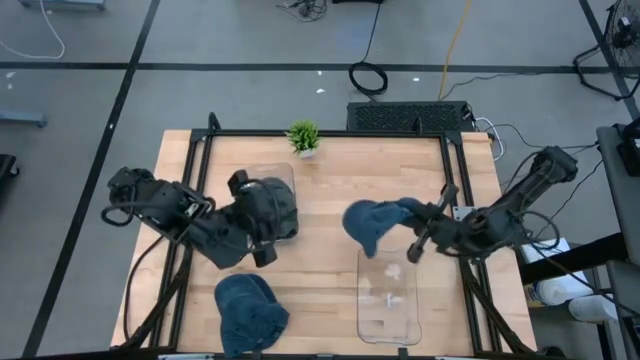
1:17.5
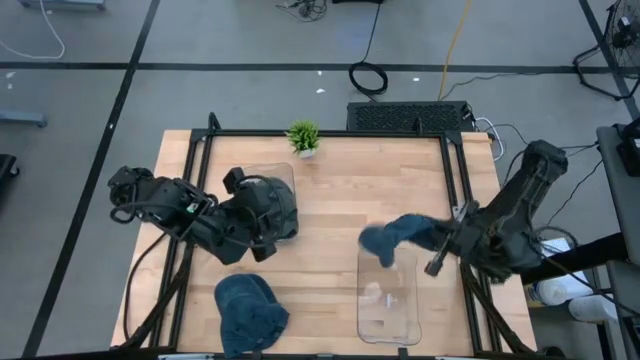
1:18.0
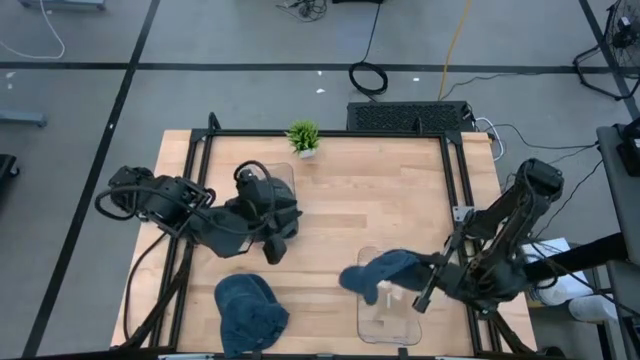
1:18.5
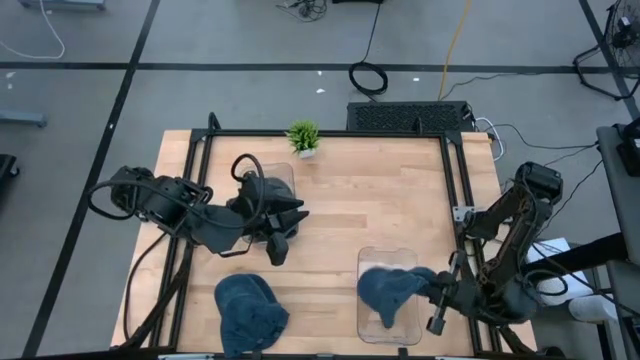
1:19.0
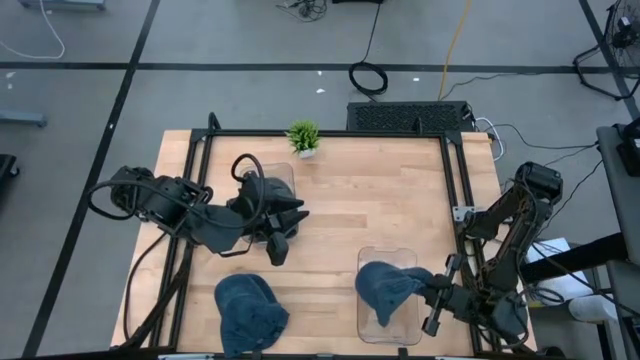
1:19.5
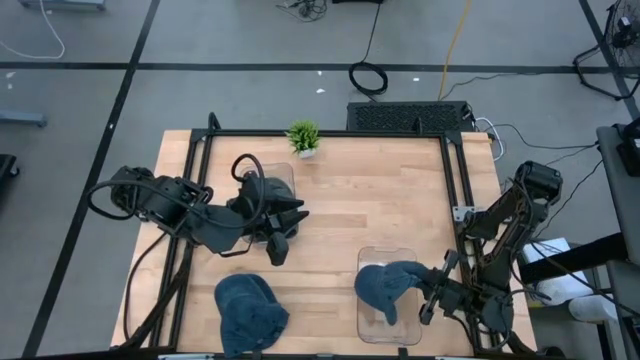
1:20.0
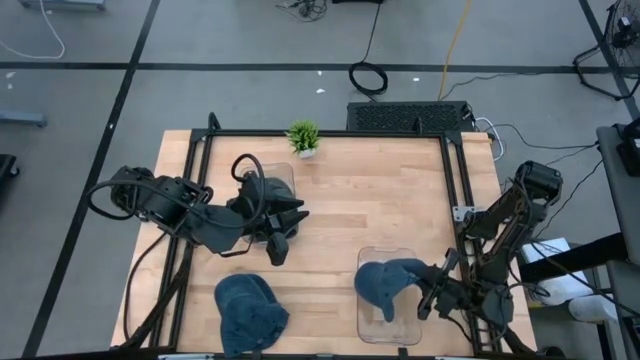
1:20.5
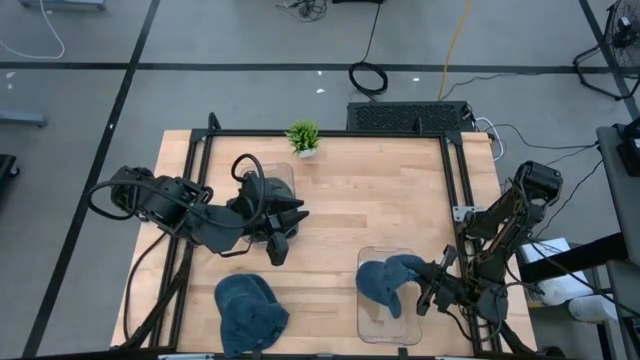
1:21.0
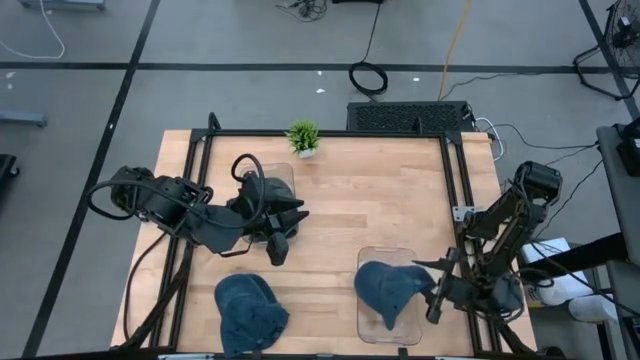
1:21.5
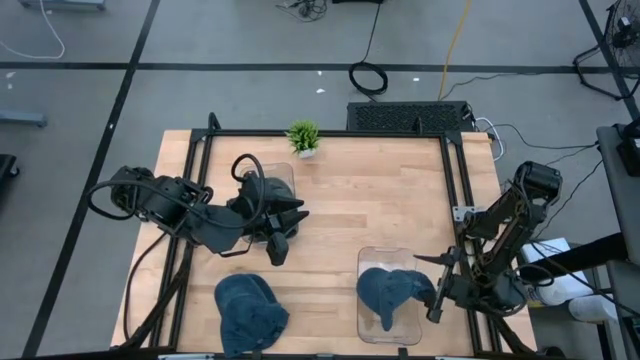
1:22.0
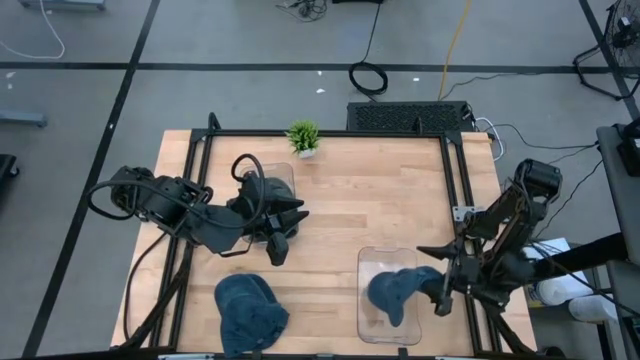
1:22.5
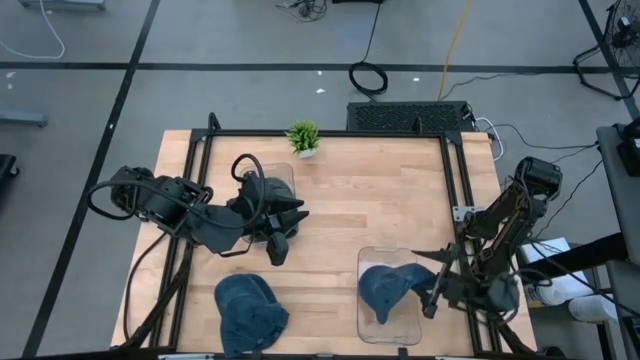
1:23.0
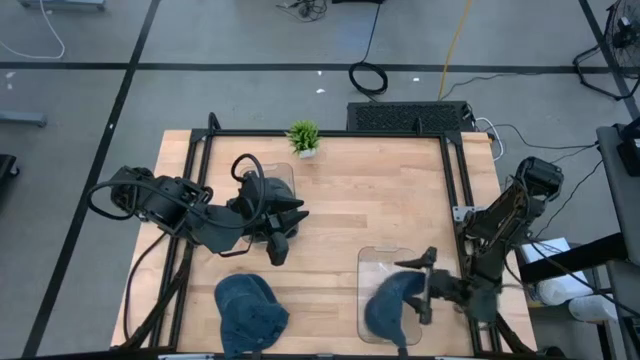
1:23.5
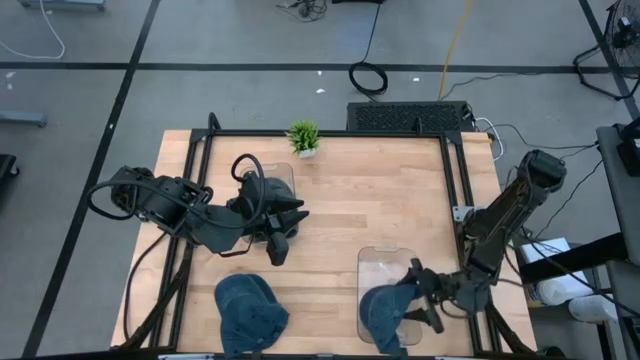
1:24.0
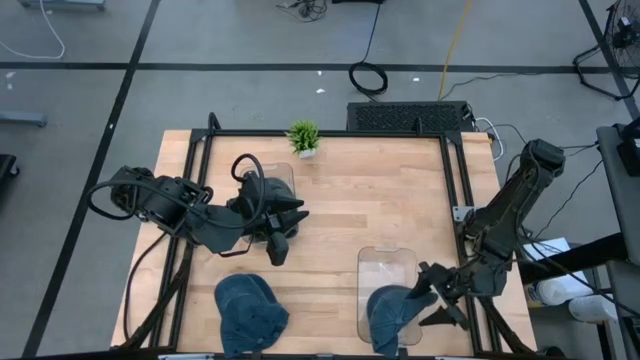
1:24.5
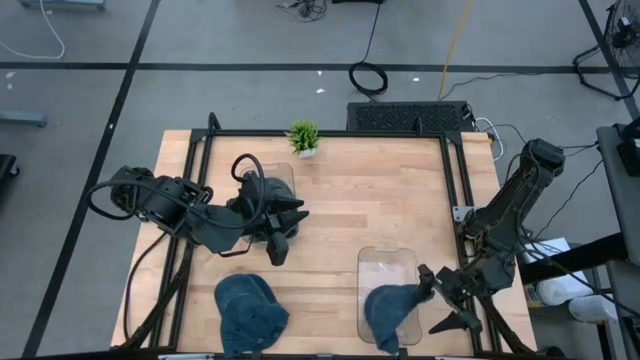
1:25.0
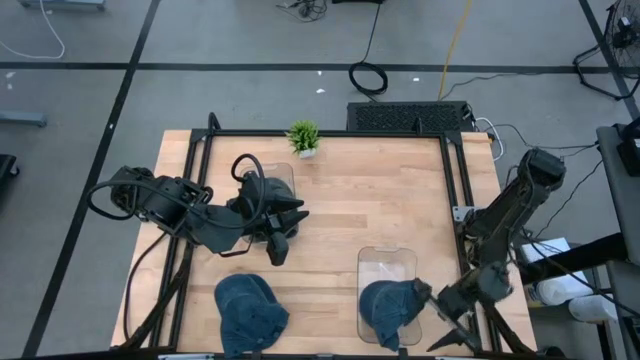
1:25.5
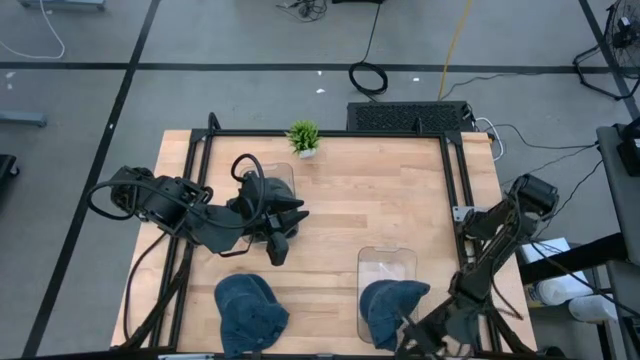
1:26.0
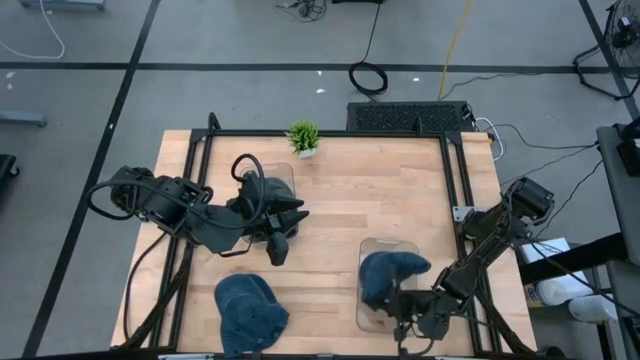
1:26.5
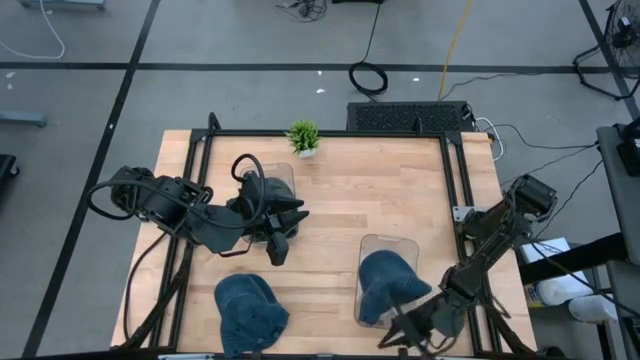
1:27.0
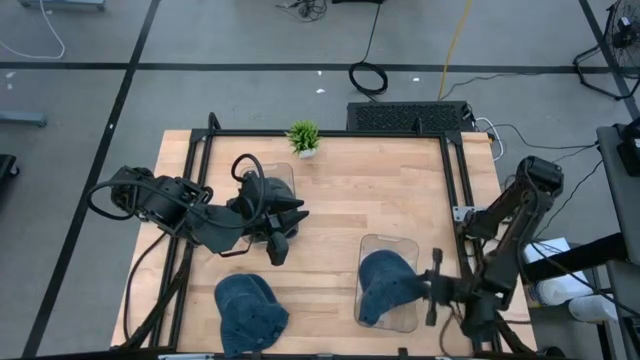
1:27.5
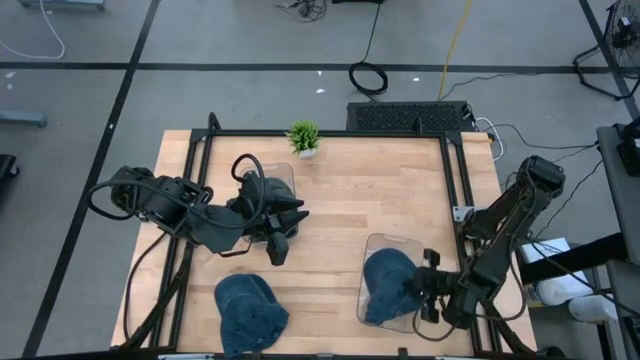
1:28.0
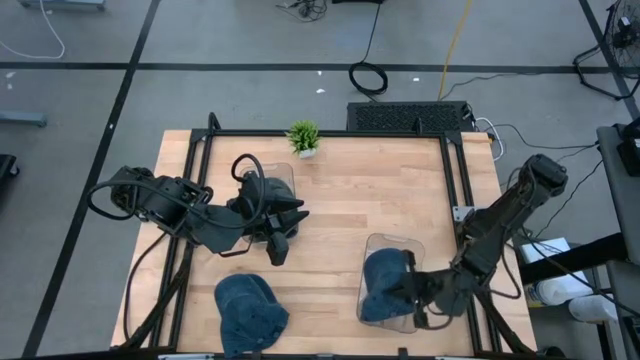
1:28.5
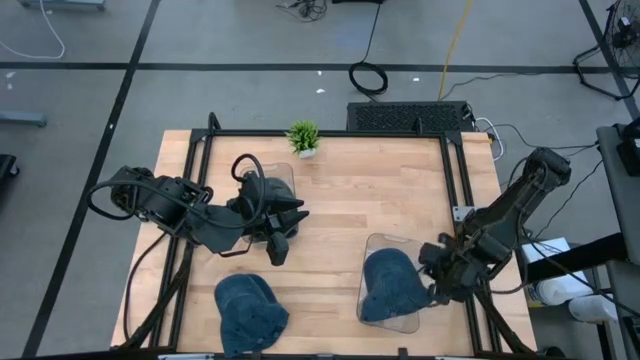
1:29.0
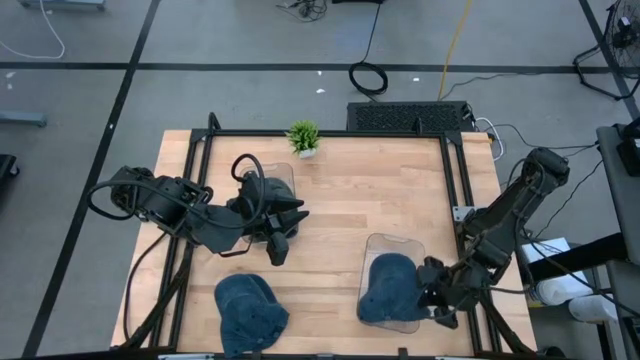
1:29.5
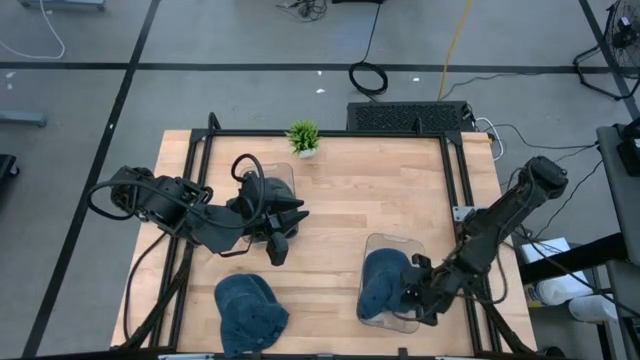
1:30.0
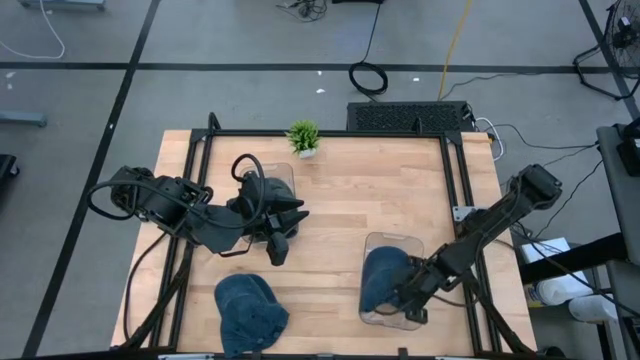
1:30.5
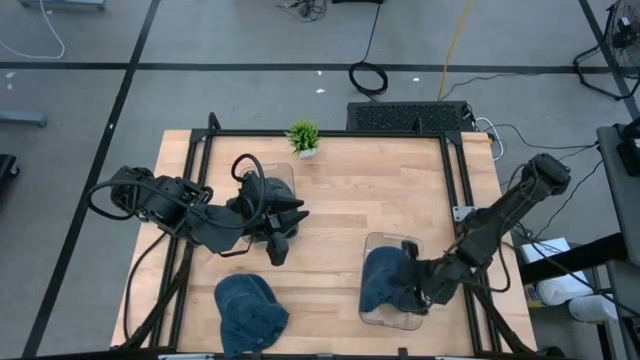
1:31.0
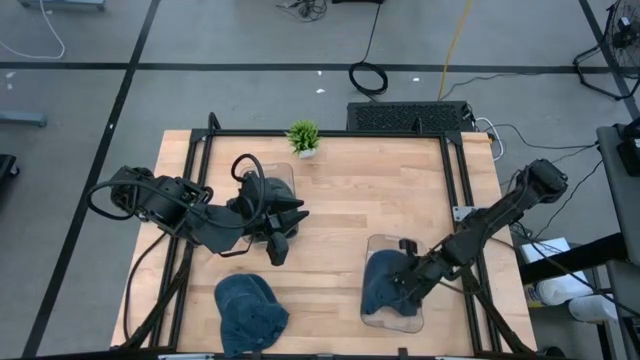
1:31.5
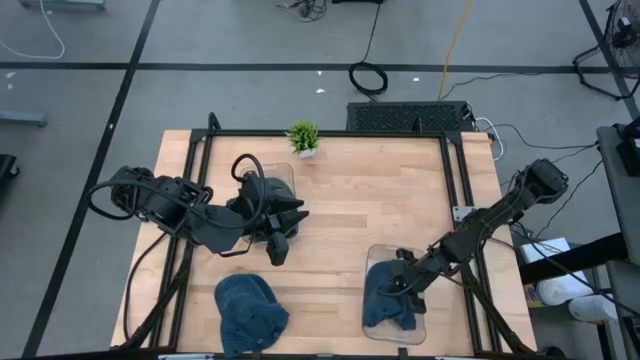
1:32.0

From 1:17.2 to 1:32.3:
Task: Pick & Place hat
Put the blue cap into the bottom transparent bin

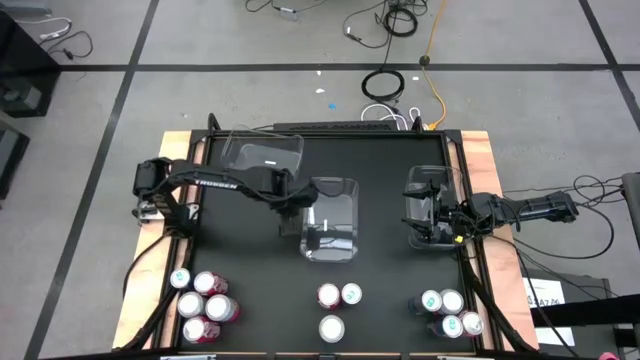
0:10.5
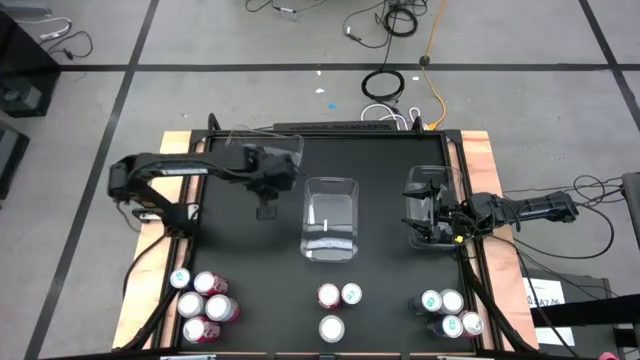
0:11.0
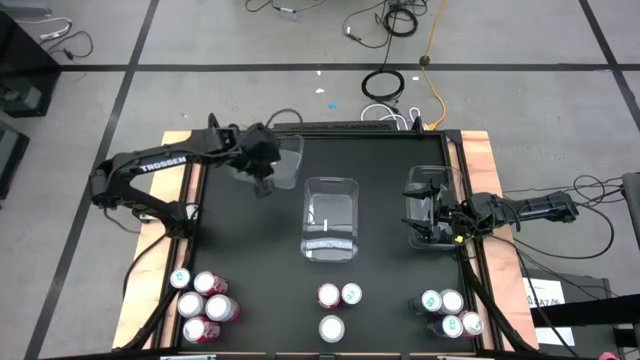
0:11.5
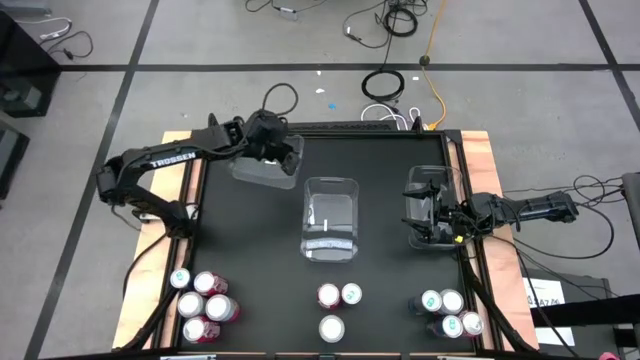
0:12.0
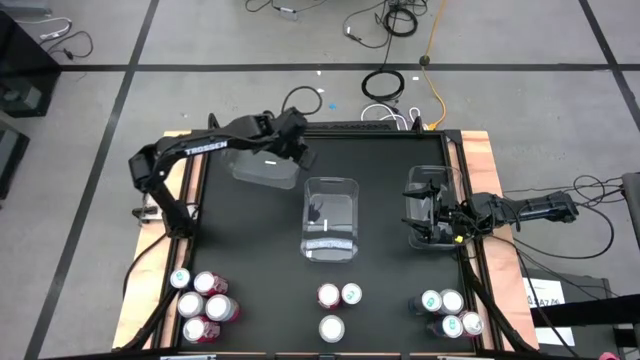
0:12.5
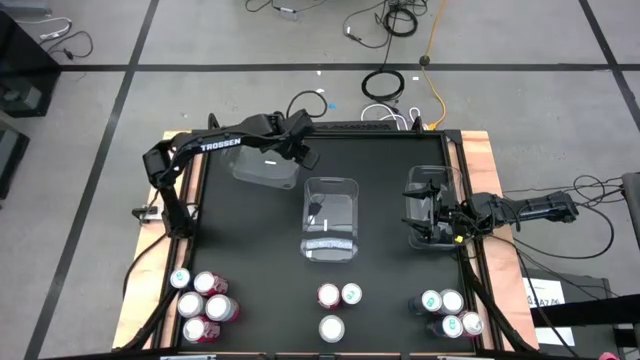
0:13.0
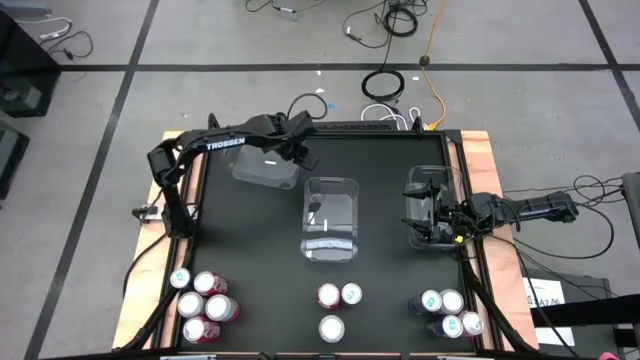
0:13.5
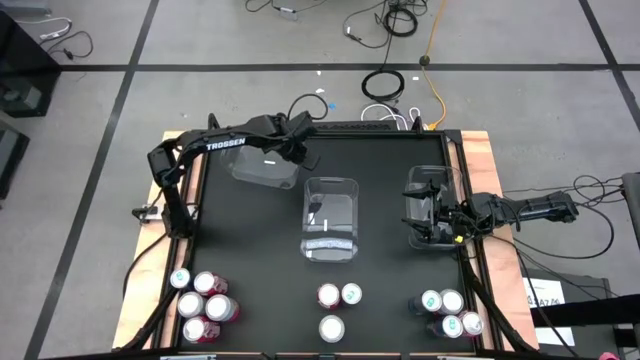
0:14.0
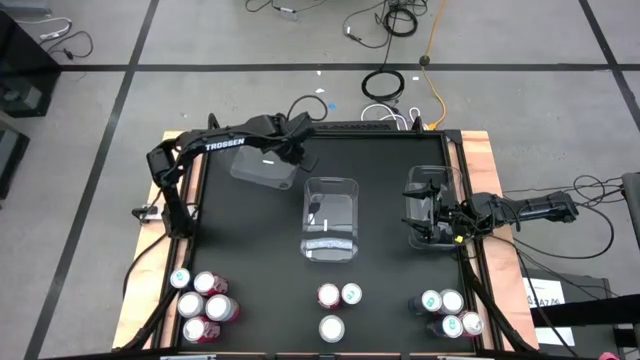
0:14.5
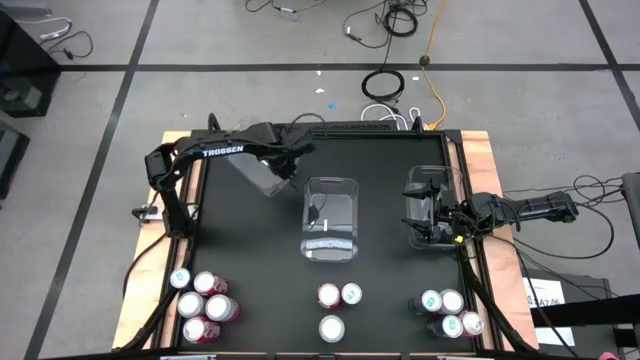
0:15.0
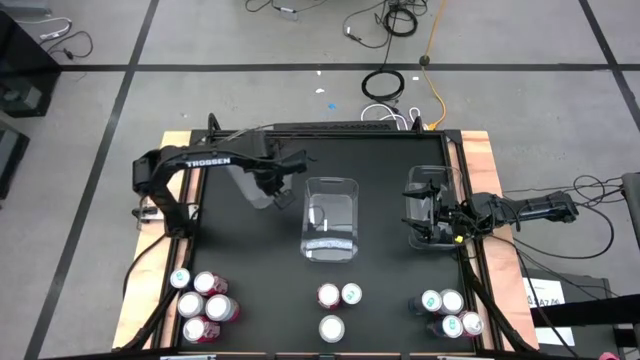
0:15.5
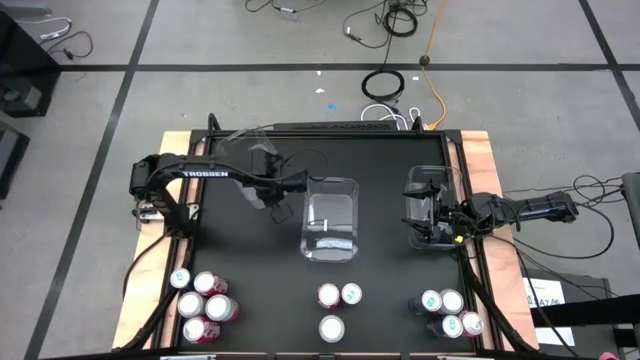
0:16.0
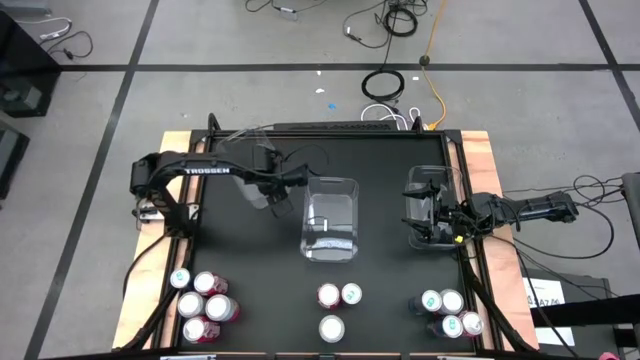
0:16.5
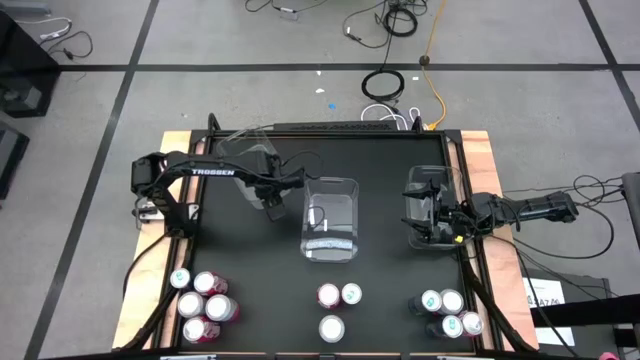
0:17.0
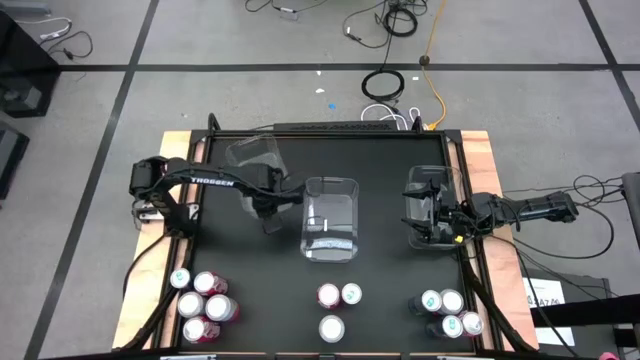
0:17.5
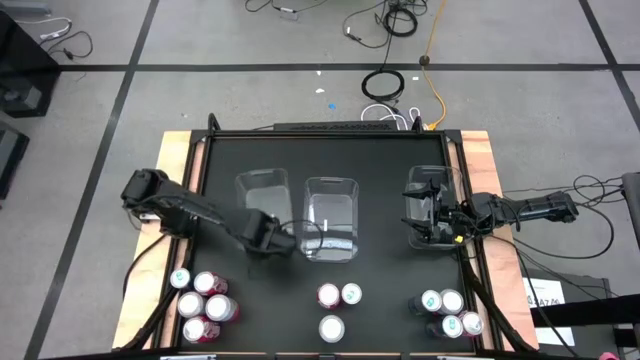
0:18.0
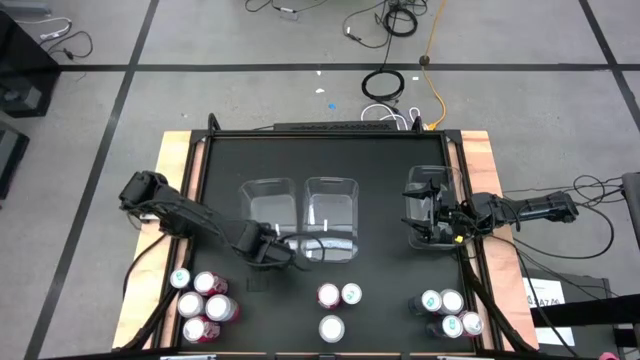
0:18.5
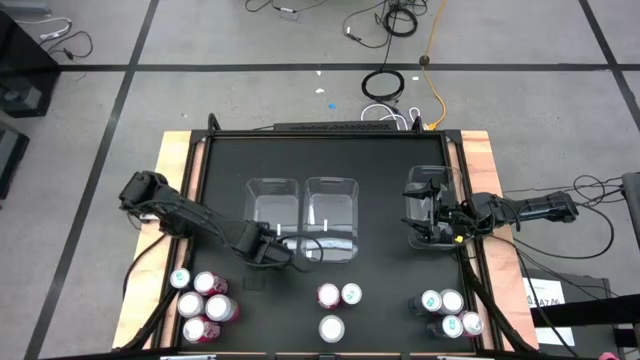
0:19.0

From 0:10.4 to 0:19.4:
Task: Sort soda cans
Move the top left transparent bin beside the center transparent bin
